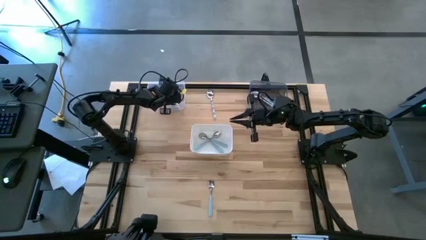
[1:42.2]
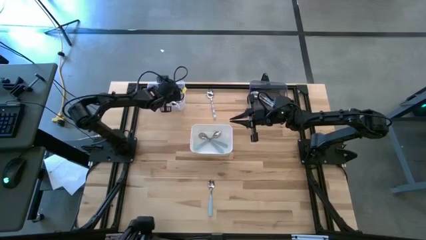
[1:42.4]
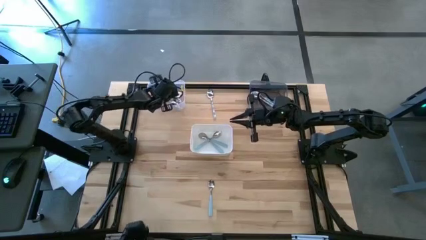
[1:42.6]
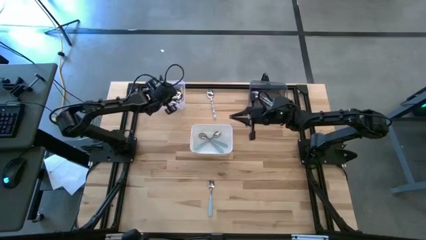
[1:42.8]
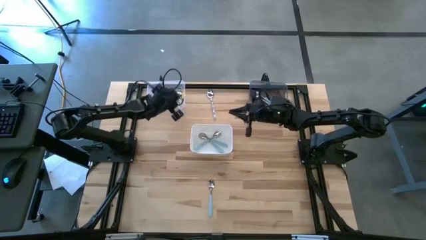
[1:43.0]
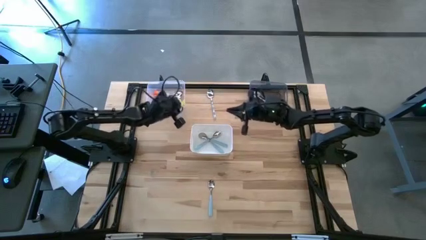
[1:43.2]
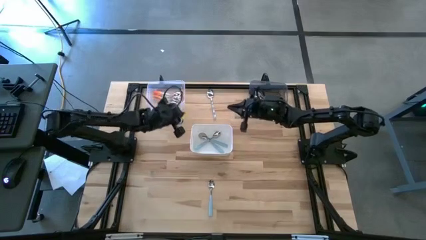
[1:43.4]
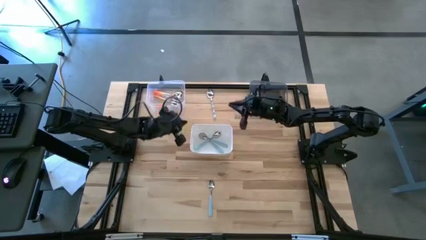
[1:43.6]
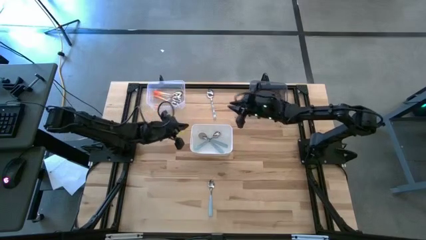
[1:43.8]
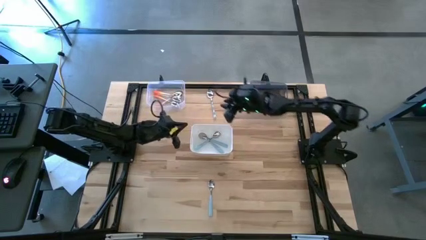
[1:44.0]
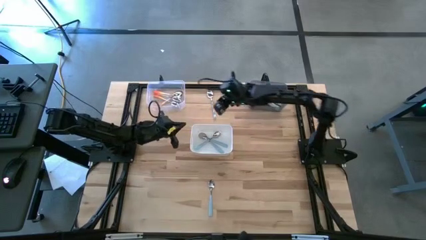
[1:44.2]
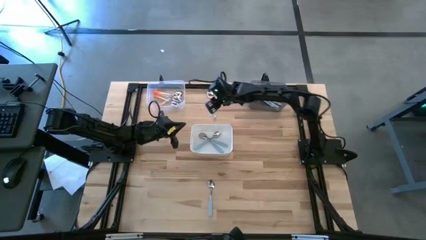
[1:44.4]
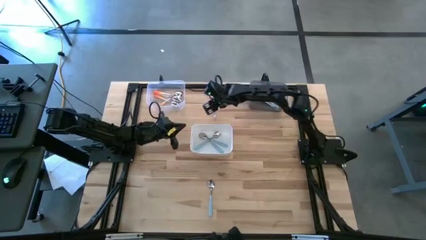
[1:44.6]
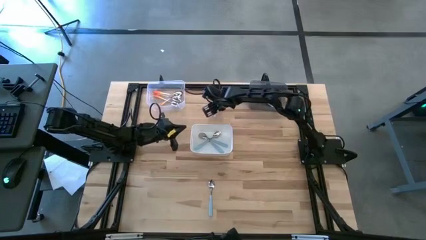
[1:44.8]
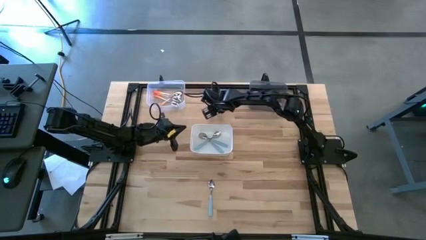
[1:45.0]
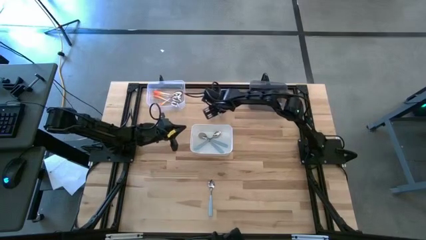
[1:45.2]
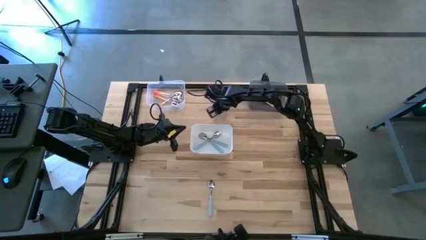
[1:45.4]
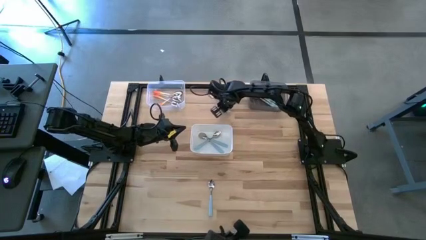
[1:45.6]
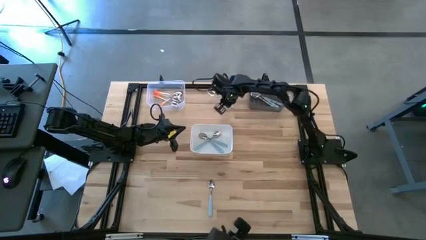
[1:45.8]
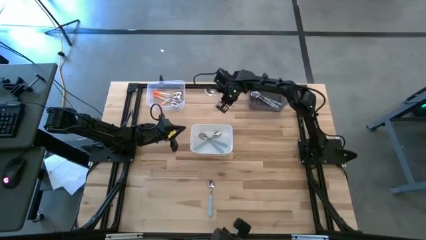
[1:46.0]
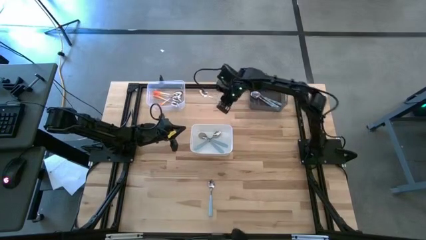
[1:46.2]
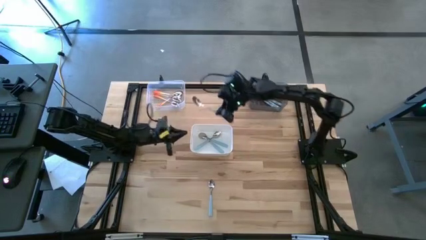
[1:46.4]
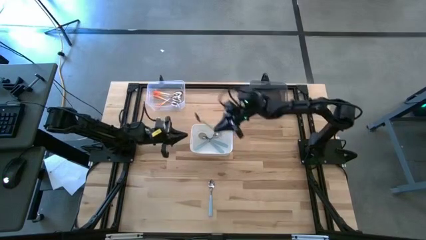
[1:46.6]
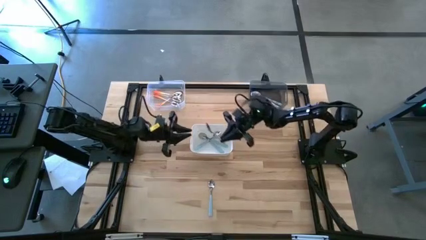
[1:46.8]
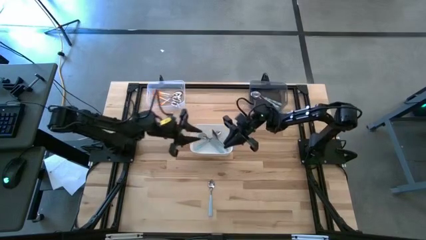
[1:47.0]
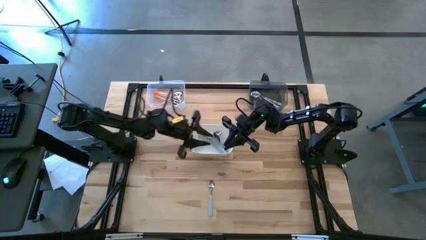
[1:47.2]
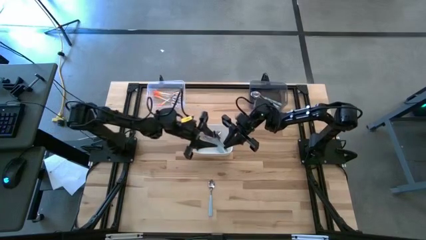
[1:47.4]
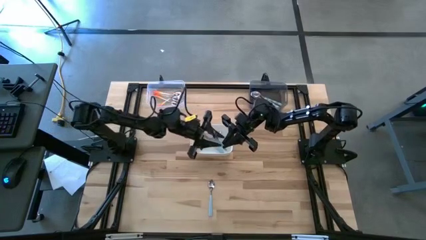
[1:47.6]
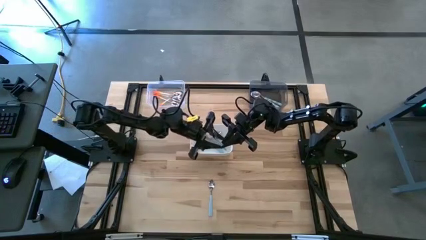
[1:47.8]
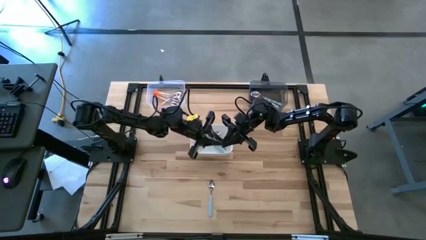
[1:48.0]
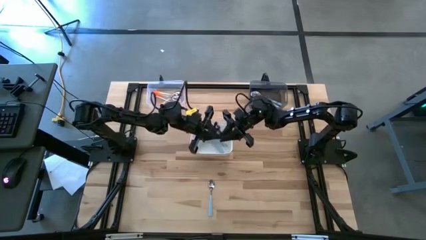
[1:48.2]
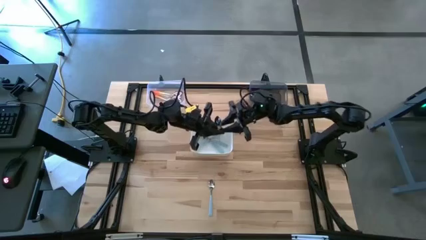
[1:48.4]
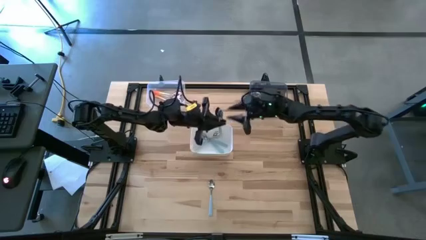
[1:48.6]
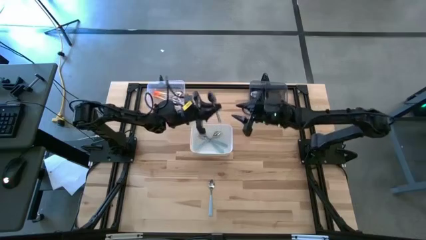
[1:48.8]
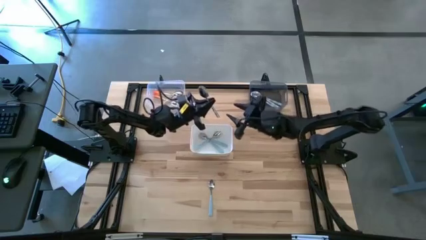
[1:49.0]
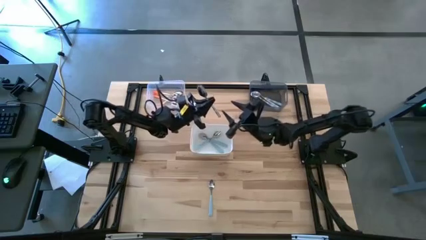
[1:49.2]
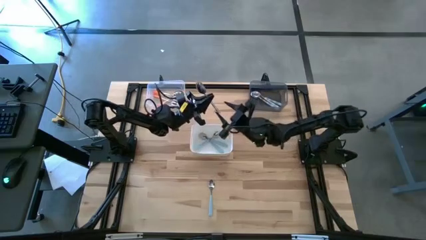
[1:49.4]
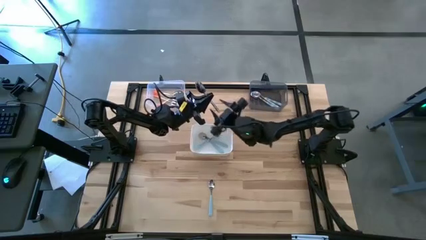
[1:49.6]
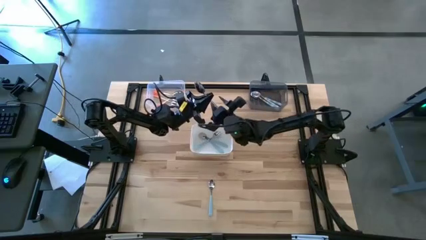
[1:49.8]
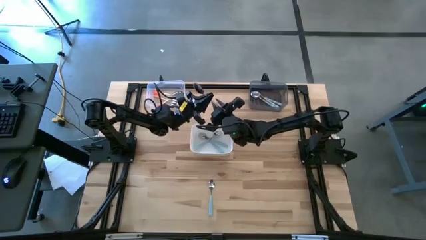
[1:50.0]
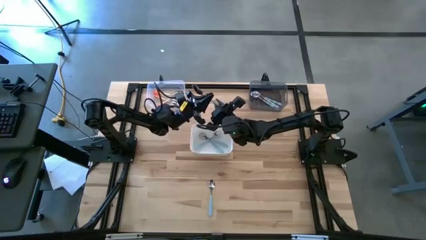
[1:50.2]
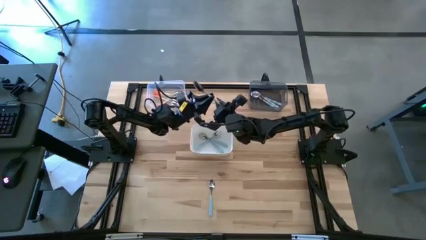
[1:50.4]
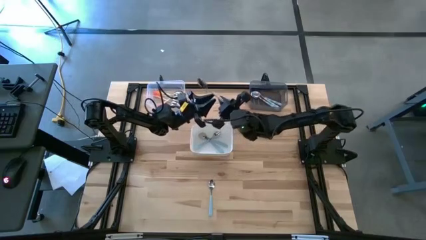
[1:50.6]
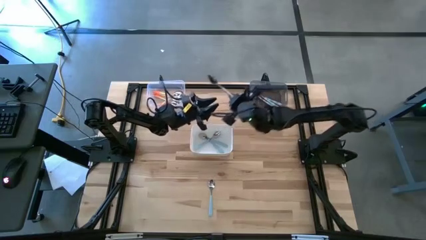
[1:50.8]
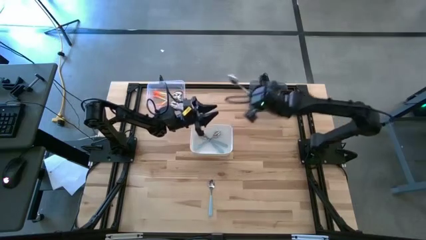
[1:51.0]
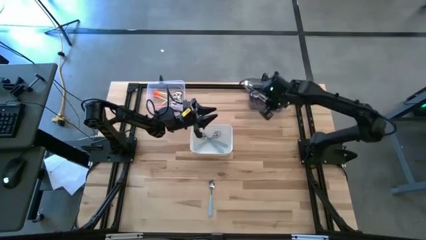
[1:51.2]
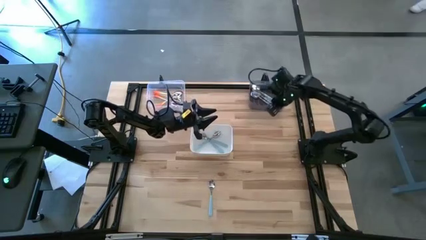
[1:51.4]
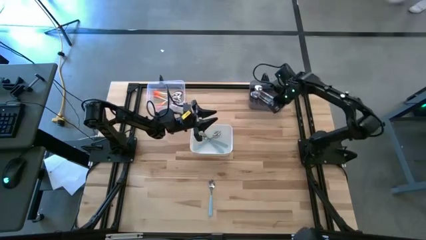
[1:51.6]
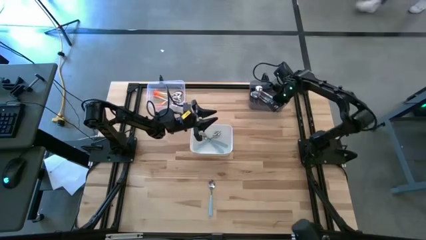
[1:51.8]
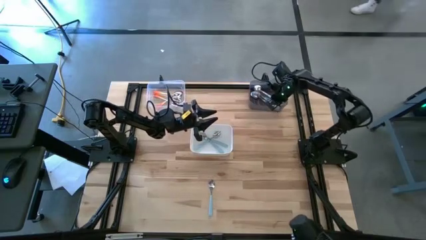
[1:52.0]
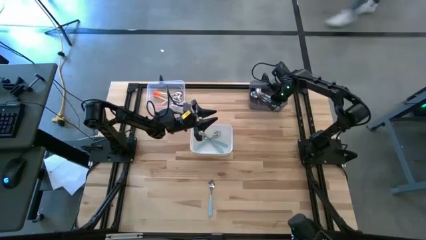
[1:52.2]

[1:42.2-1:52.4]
Task: Sort silverware by color (type)
Put the blue patterned spoon into the black bin

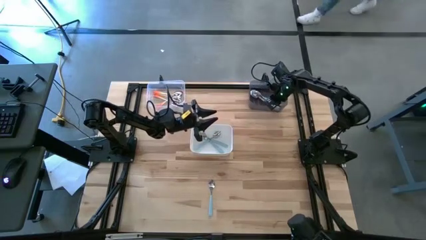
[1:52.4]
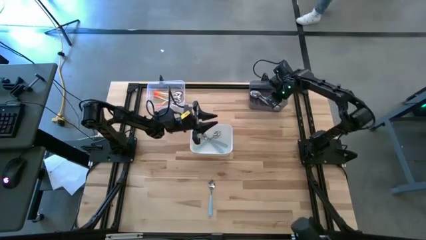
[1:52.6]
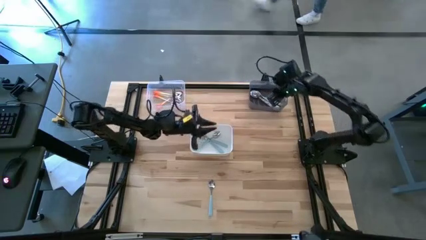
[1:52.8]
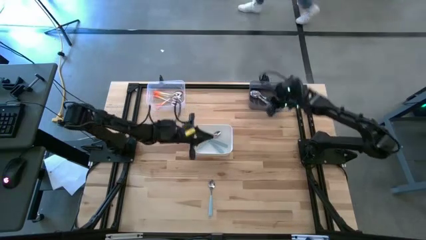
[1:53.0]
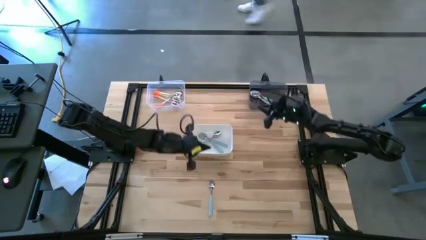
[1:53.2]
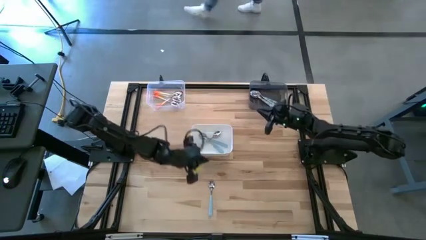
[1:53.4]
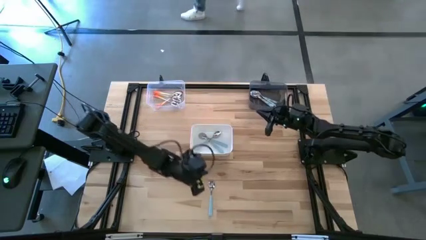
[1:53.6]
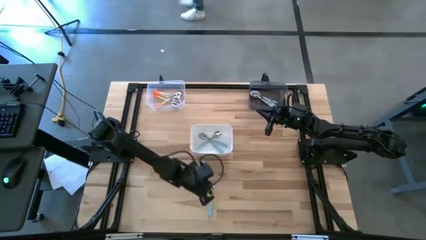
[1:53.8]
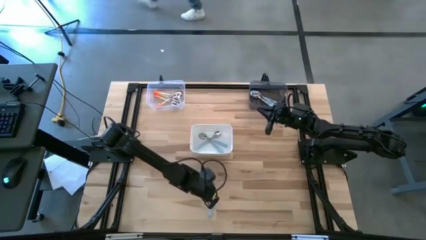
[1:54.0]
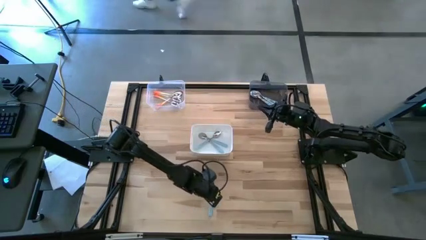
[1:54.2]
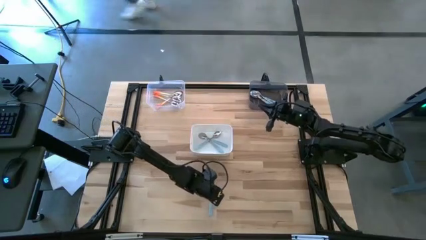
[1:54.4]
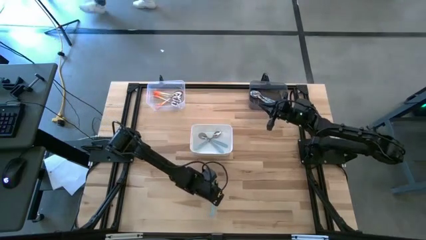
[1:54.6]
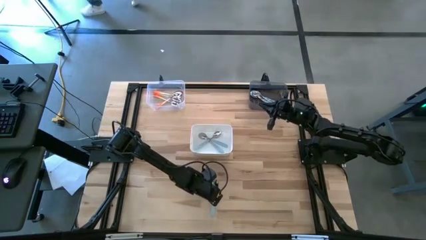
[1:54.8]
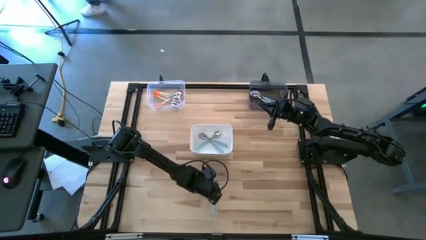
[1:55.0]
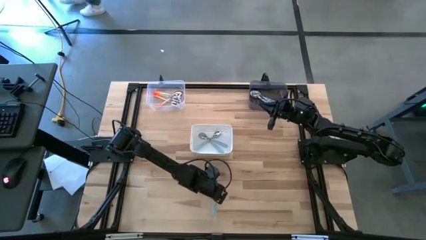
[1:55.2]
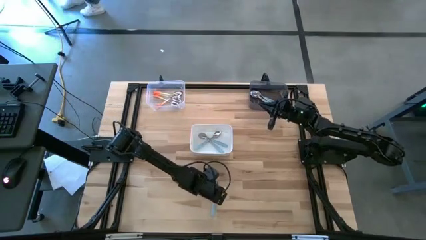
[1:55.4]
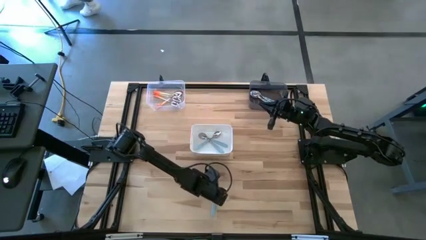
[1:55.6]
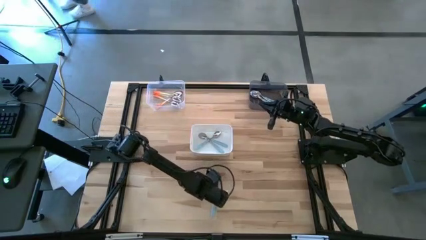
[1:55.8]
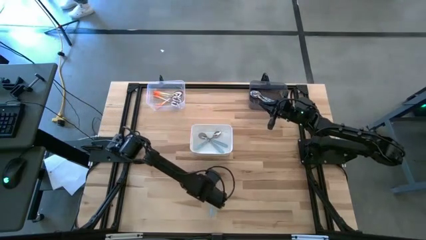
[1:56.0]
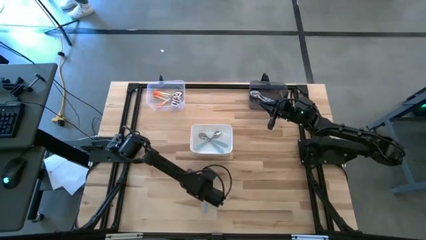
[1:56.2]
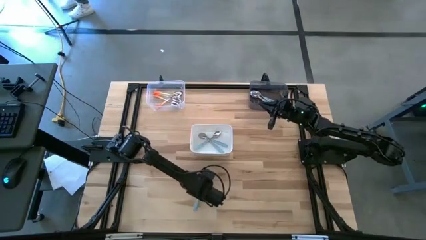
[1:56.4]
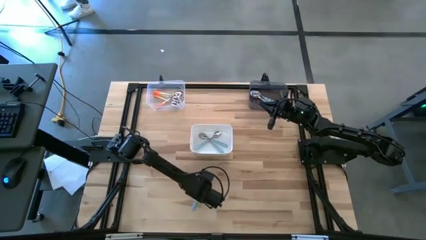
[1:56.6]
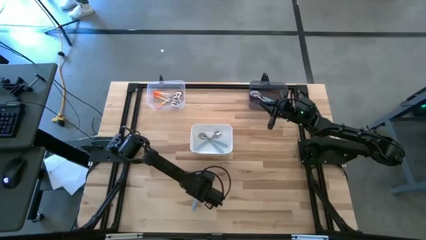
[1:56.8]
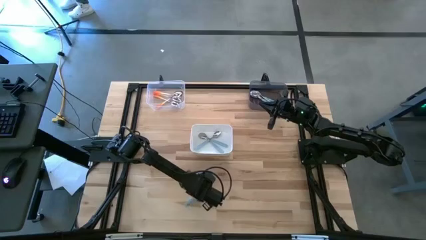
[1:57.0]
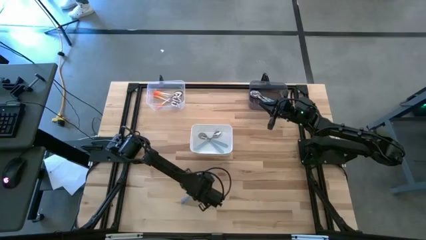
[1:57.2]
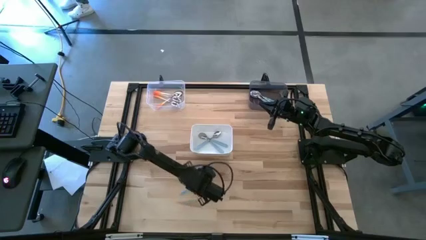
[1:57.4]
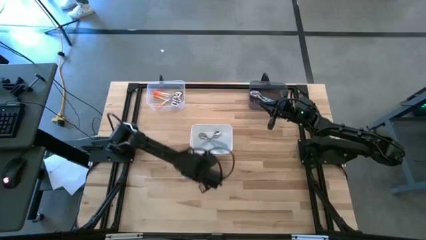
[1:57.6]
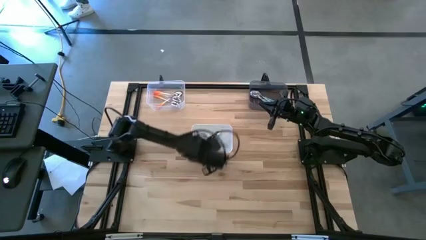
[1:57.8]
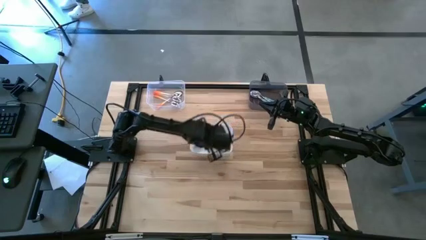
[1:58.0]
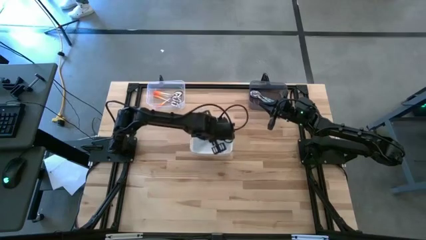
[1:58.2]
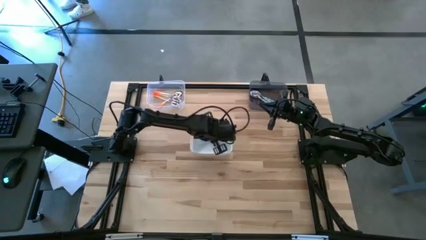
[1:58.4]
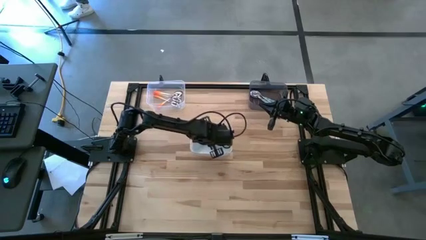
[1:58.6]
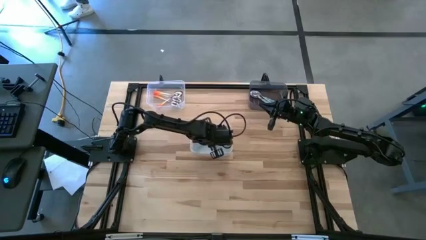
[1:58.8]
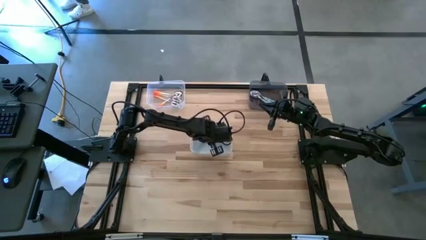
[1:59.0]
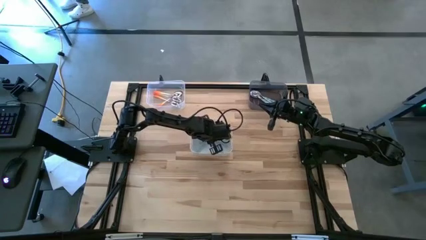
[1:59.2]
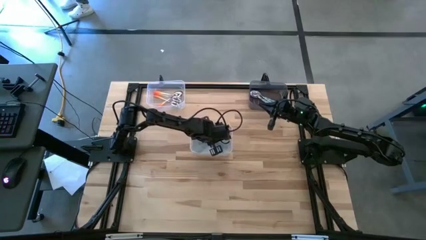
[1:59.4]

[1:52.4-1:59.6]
Put the blue spoon into the white bin
